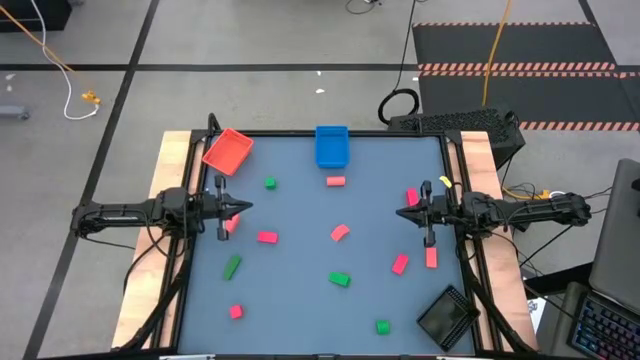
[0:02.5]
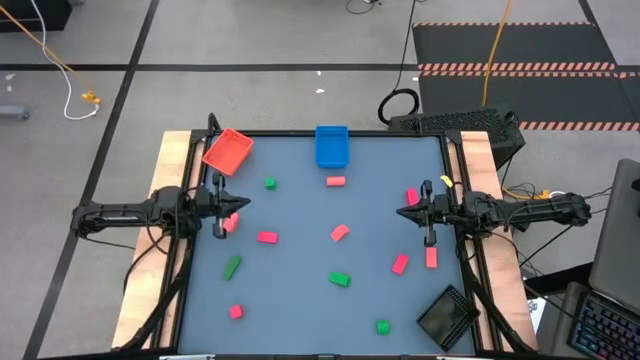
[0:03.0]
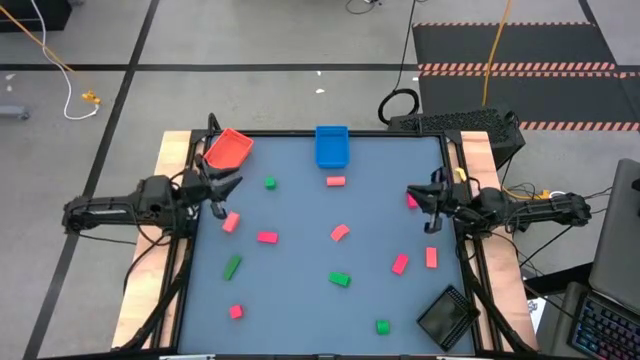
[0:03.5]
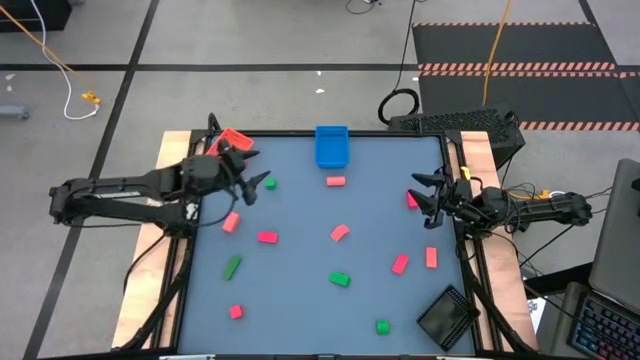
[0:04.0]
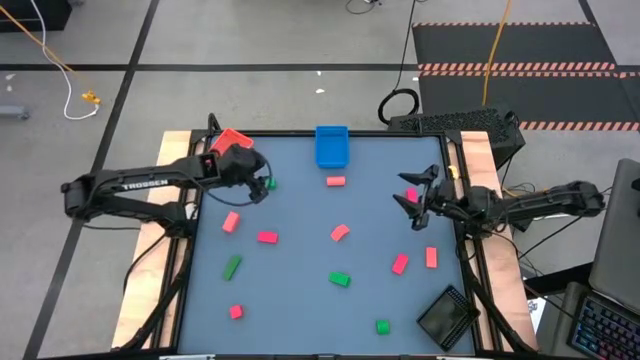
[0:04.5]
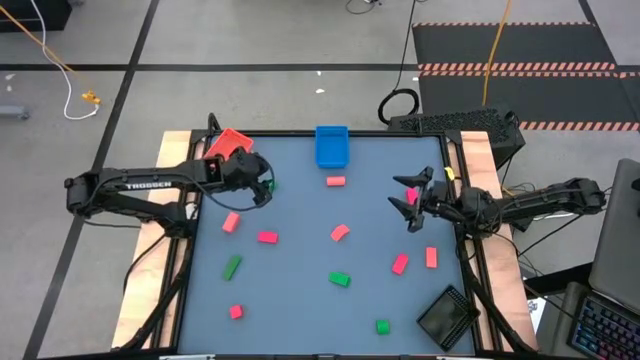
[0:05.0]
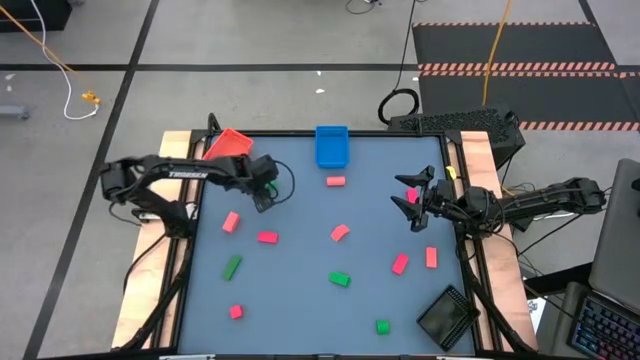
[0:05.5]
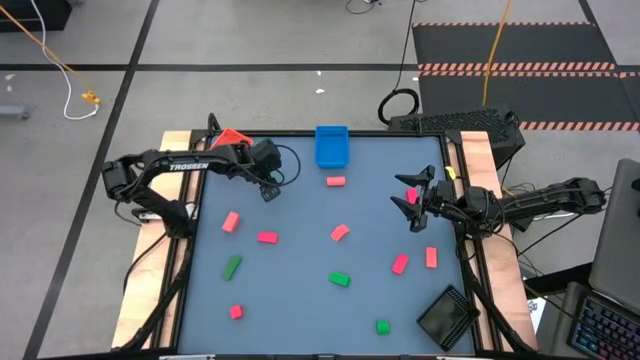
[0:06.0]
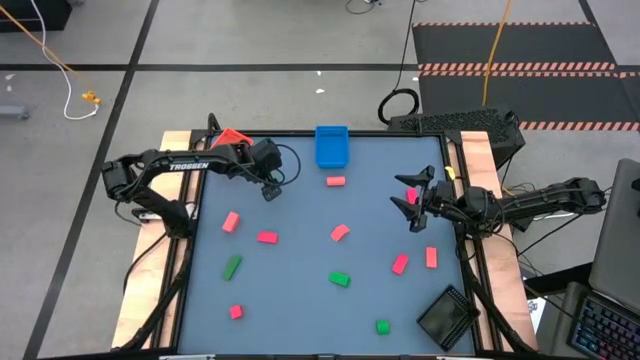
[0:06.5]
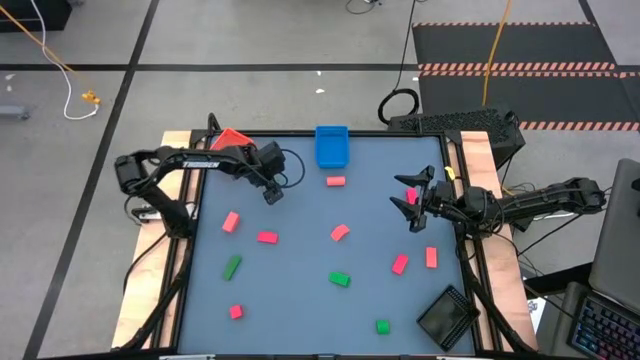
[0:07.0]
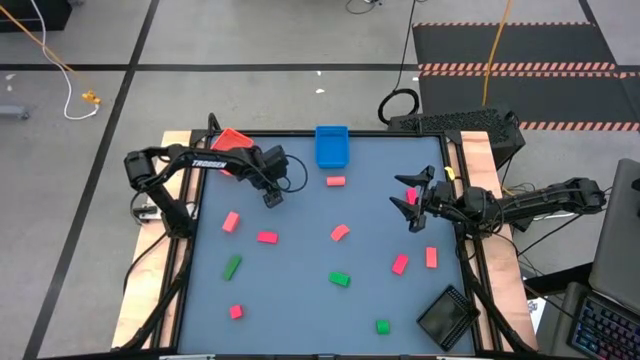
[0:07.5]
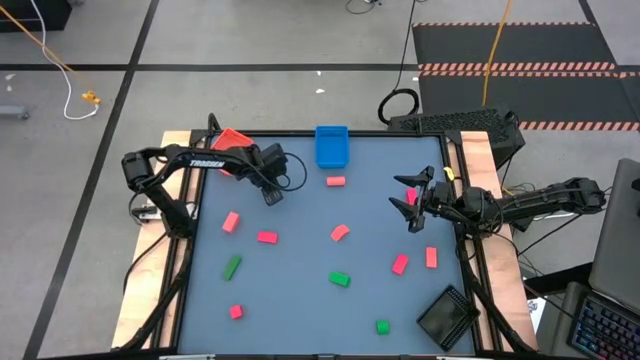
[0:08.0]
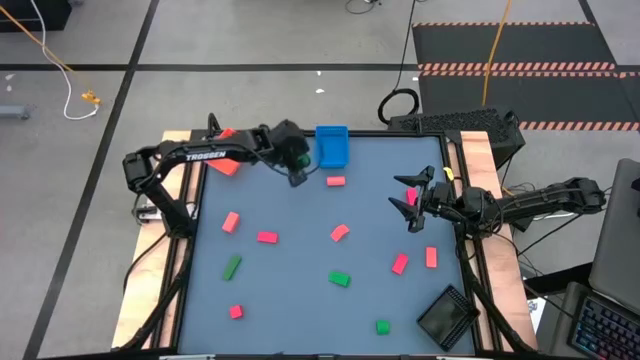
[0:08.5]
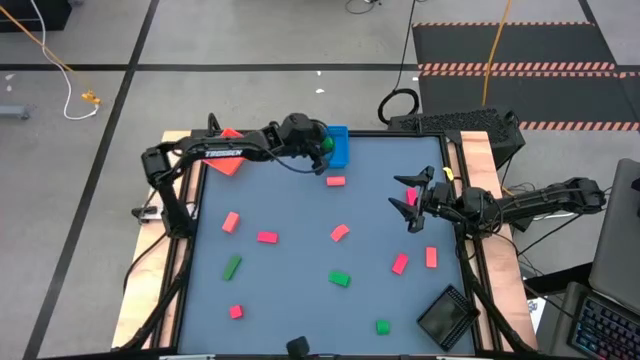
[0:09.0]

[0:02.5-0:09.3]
Task: Sort & place blocks by color
Put the green block into the blue bin

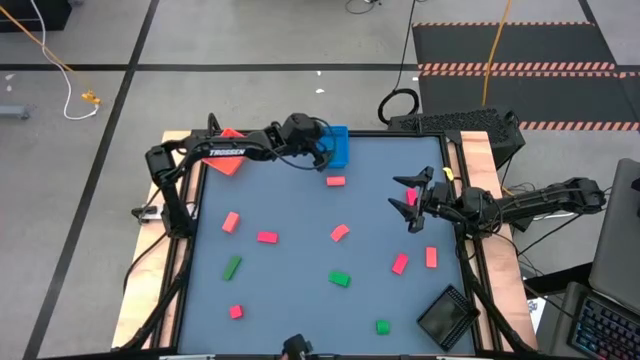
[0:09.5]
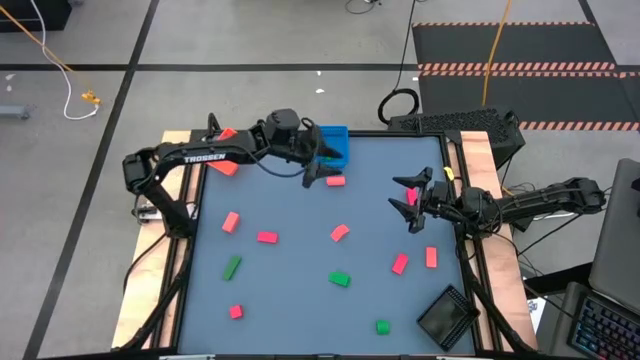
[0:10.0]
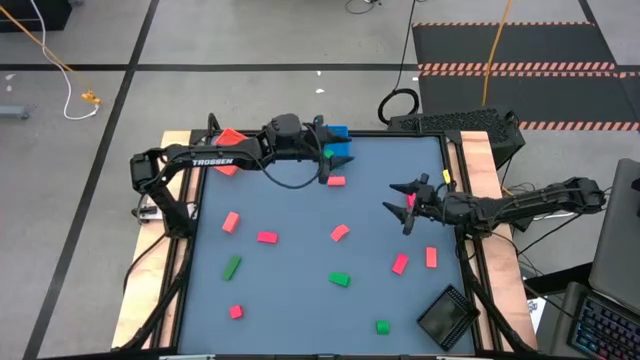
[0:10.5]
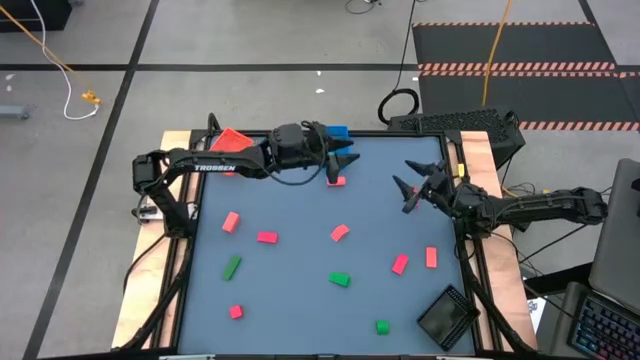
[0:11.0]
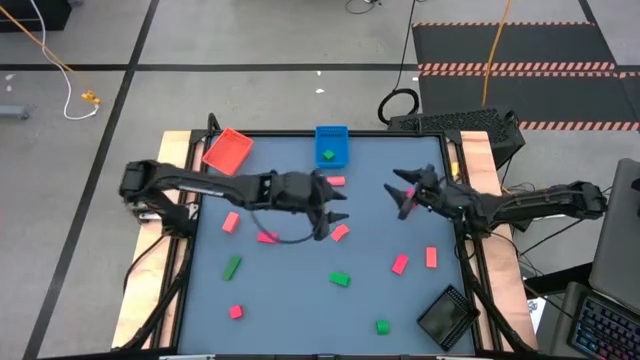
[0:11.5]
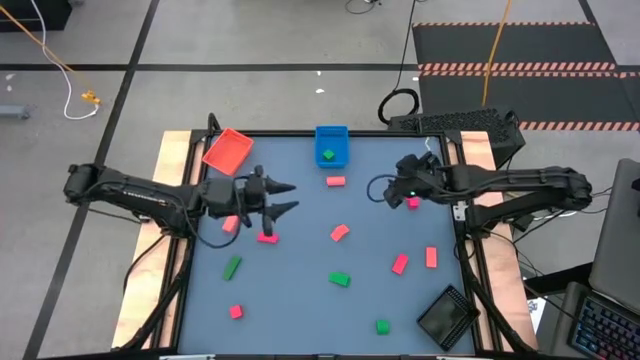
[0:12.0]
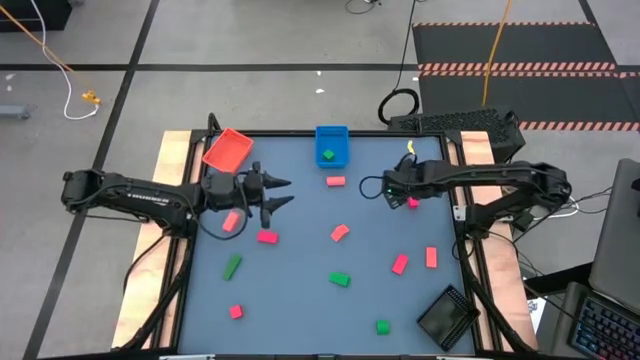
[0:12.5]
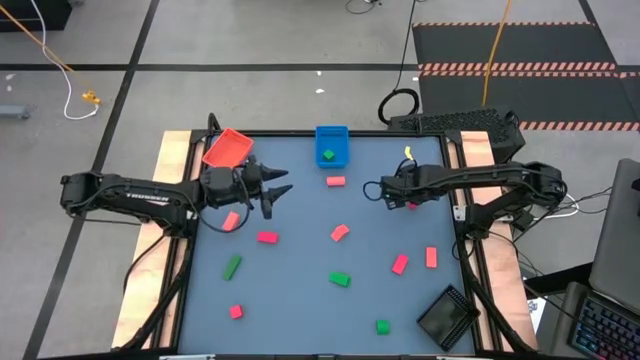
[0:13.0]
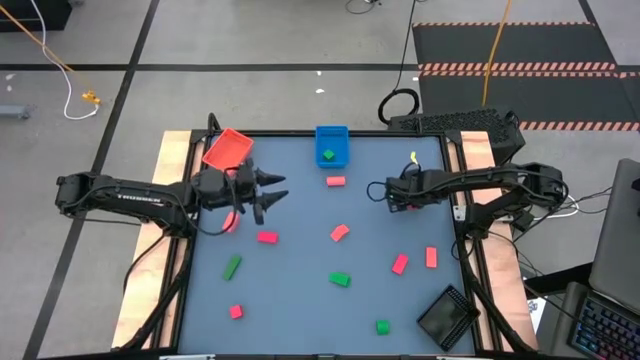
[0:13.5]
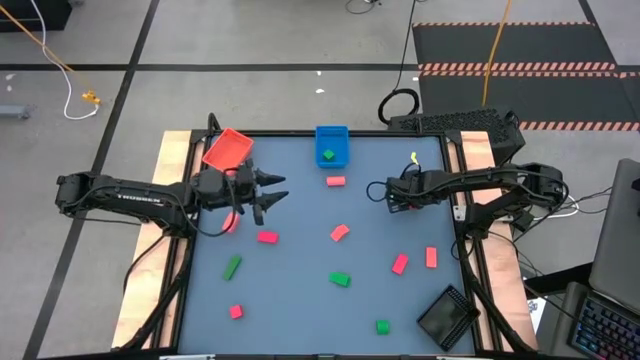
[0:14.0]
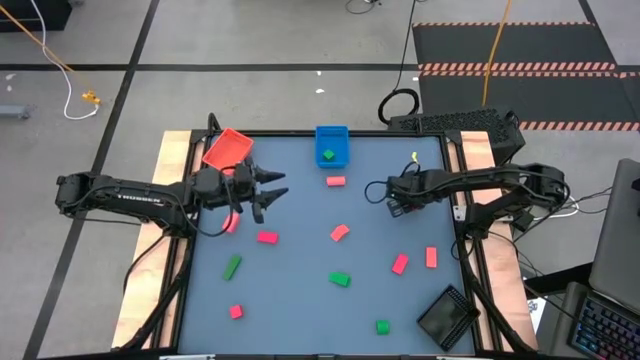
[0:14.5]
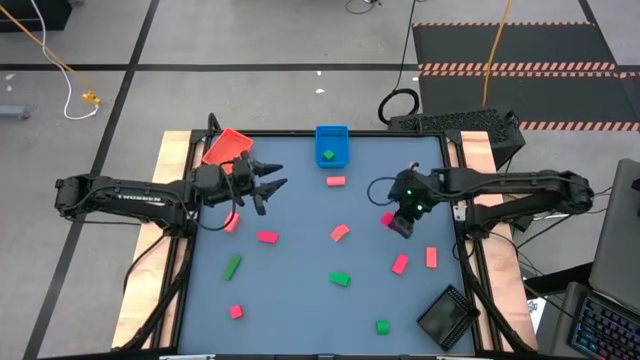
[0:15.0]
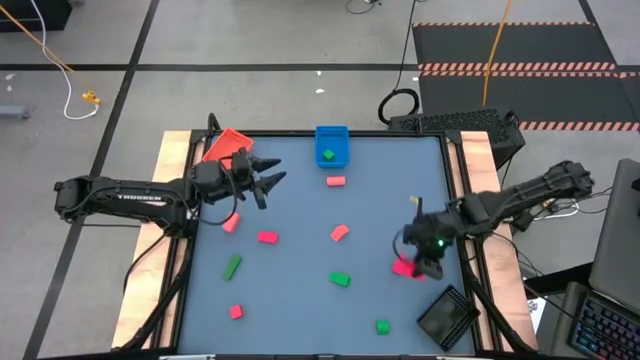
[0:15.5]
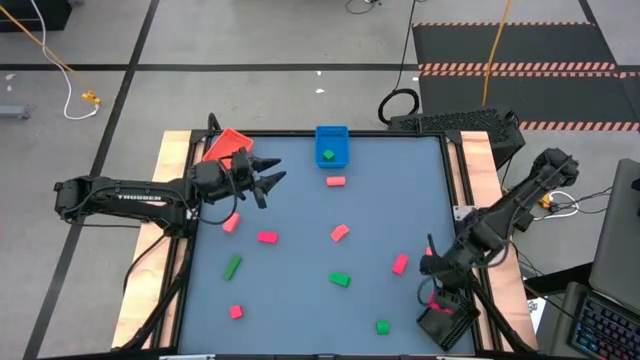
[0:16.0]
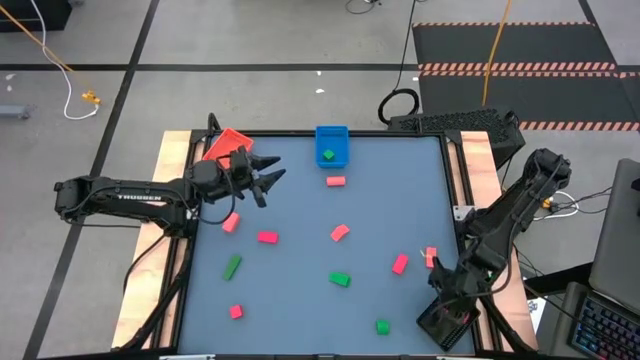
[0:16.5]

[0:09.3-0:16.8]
Put the red block into the black bin

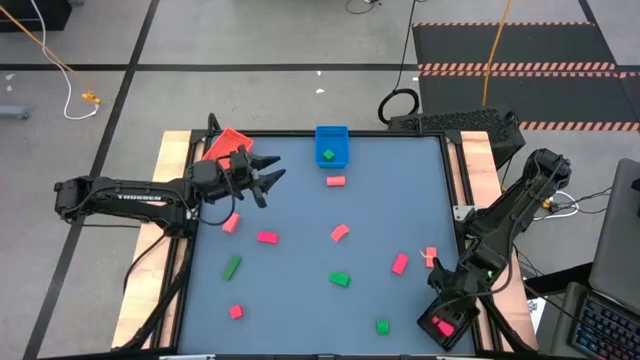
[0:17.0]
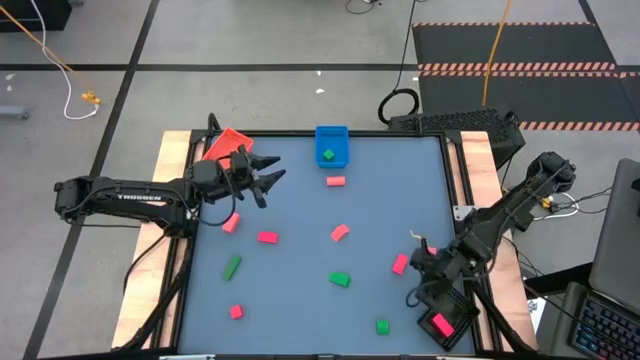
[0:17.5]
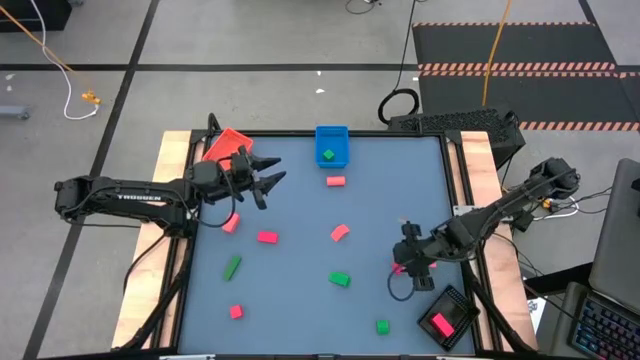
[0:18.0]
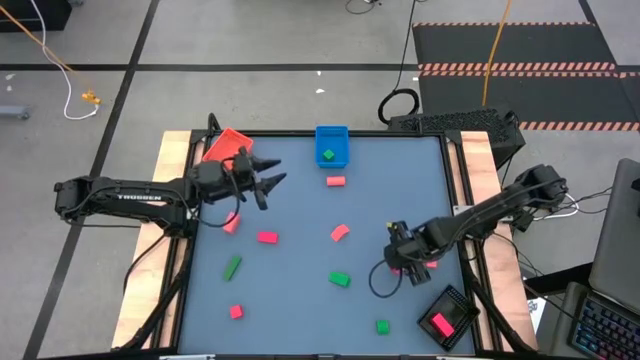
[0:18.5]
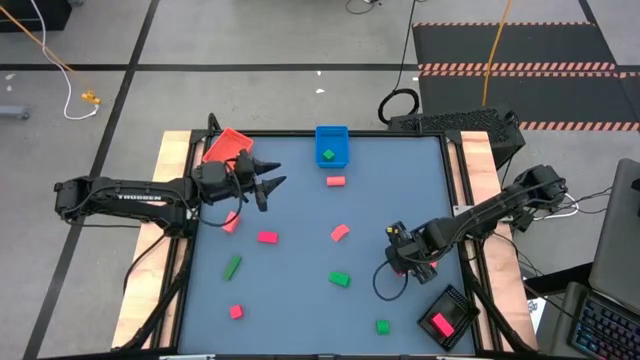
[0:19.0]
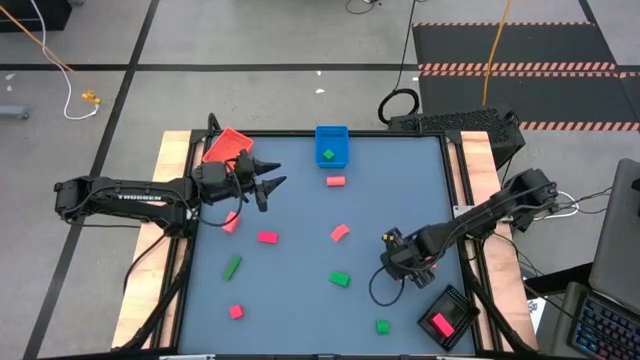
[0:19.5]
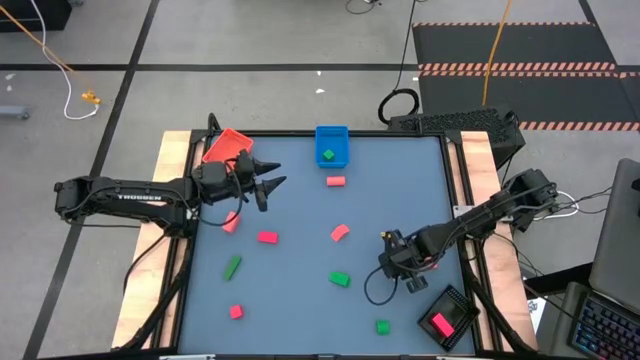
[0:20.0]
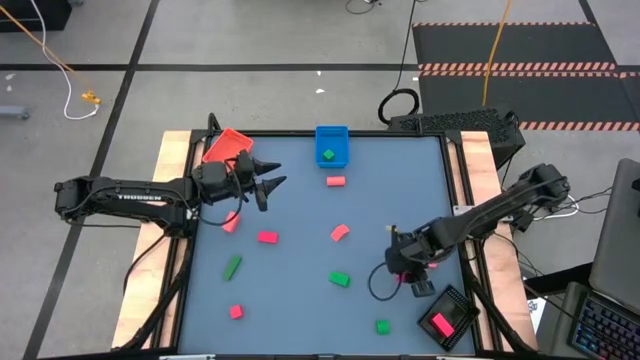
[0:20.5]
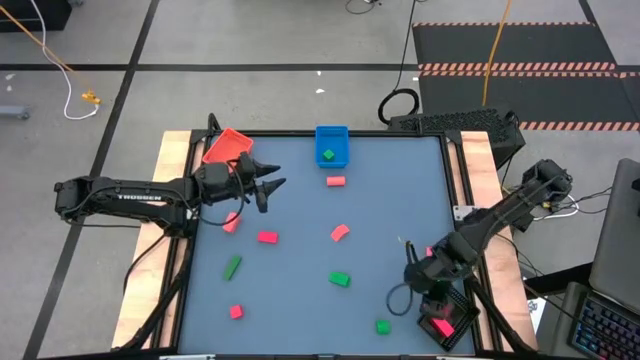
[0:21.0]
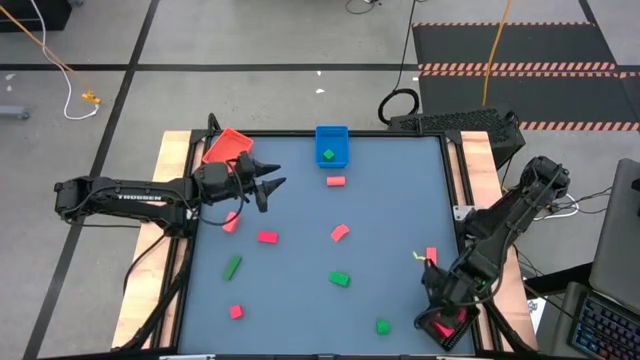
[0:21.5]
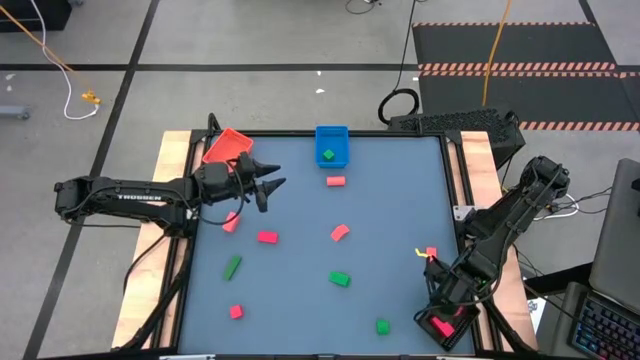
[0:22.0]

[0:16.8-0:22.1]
Put the red block into the black bin
